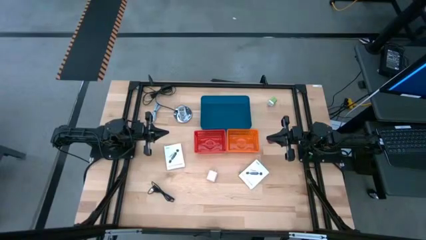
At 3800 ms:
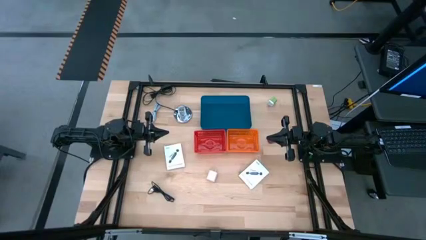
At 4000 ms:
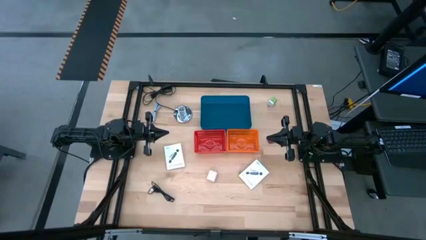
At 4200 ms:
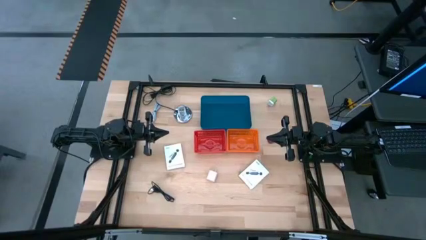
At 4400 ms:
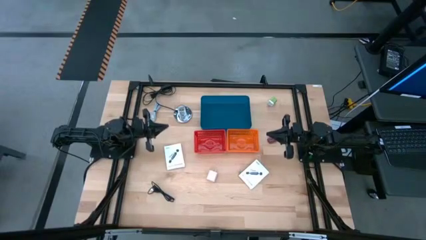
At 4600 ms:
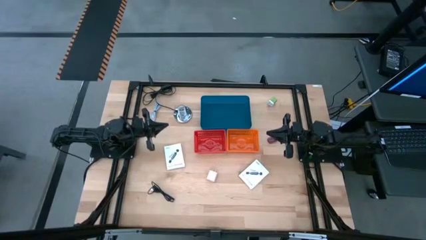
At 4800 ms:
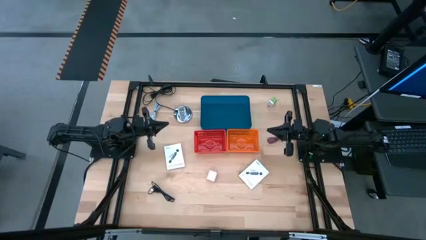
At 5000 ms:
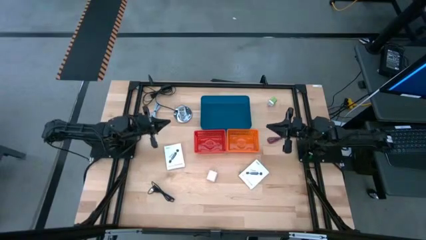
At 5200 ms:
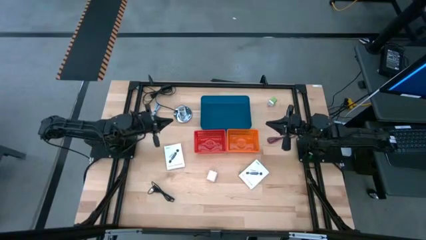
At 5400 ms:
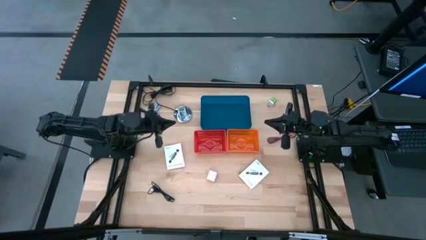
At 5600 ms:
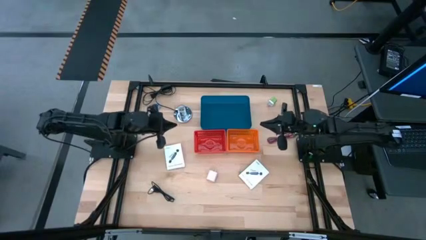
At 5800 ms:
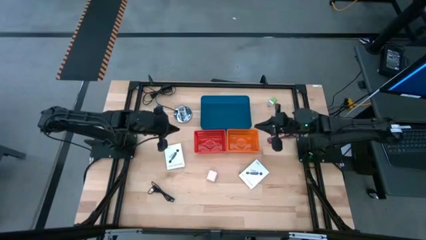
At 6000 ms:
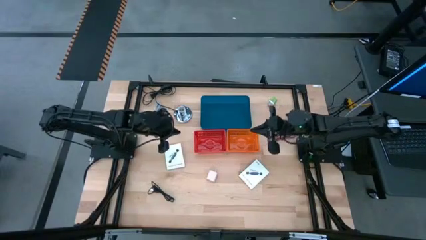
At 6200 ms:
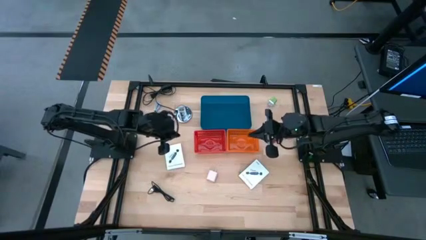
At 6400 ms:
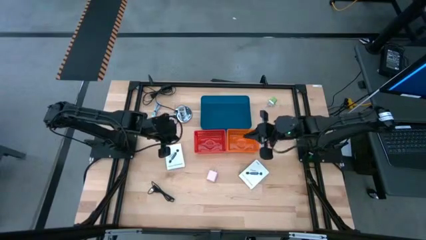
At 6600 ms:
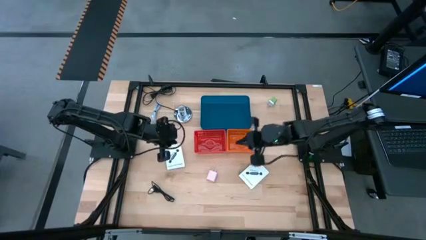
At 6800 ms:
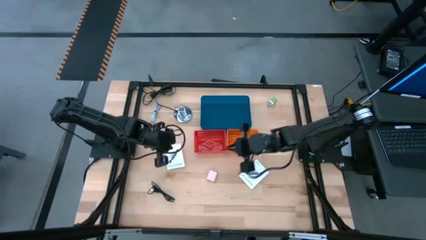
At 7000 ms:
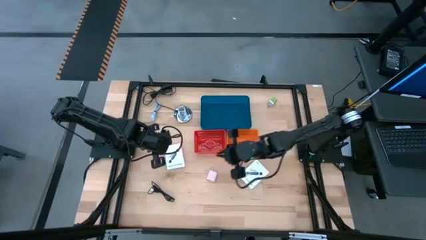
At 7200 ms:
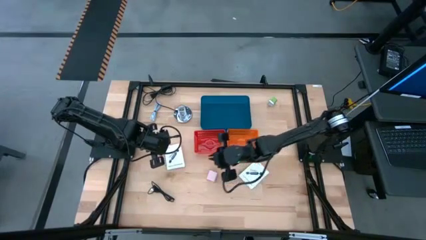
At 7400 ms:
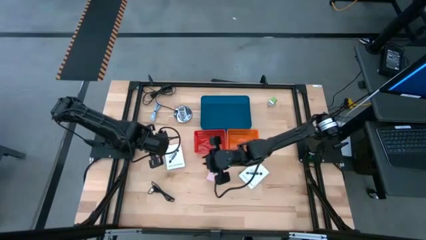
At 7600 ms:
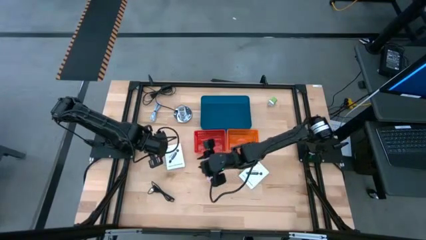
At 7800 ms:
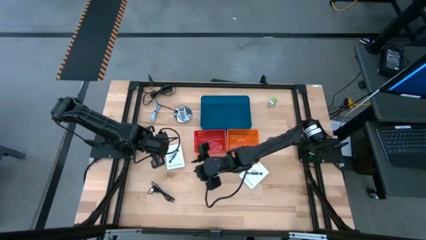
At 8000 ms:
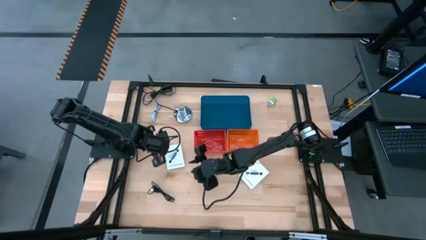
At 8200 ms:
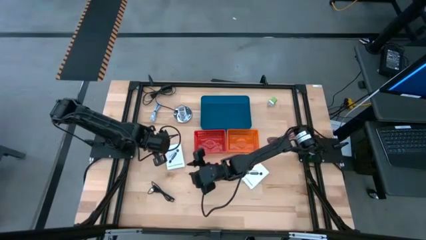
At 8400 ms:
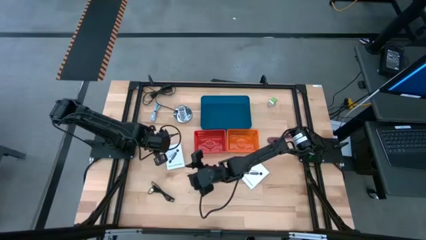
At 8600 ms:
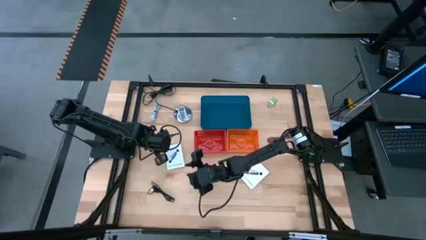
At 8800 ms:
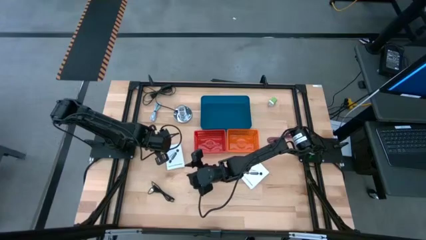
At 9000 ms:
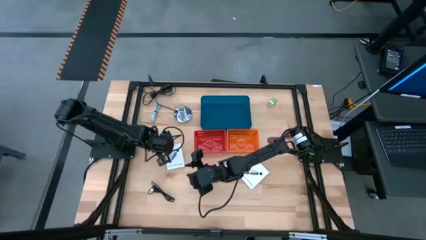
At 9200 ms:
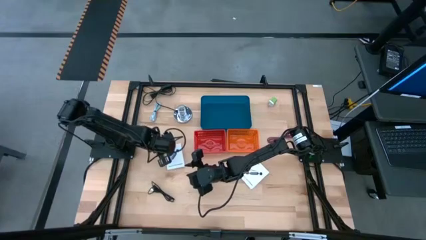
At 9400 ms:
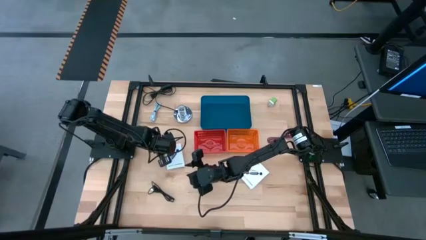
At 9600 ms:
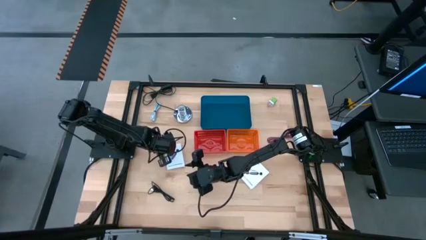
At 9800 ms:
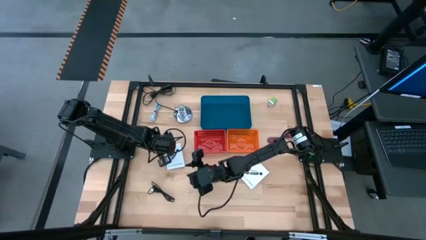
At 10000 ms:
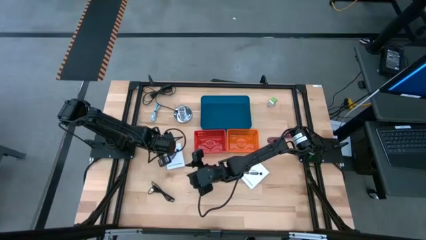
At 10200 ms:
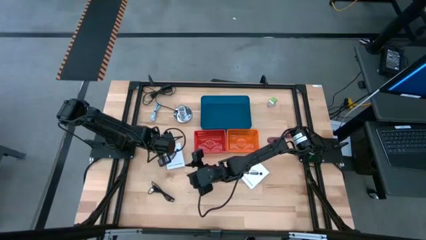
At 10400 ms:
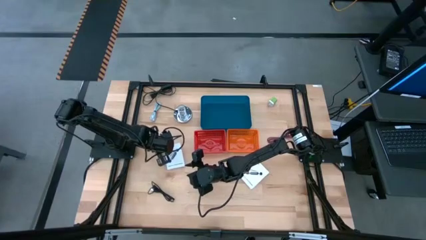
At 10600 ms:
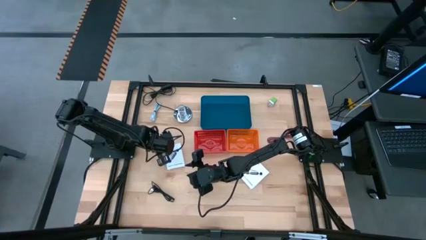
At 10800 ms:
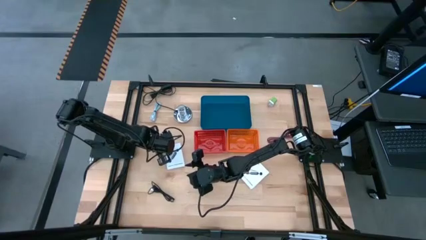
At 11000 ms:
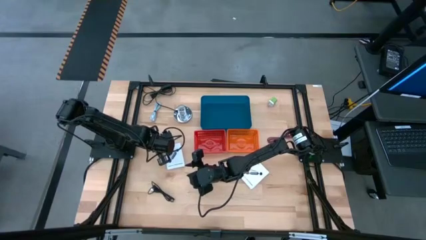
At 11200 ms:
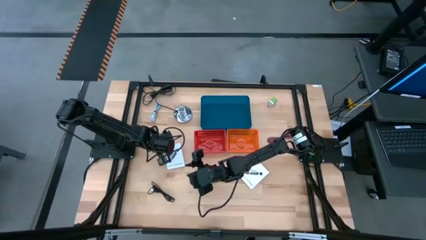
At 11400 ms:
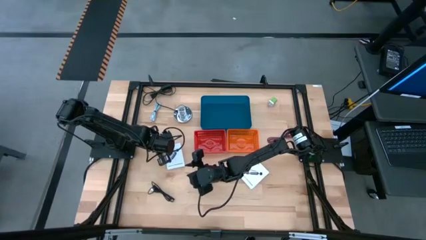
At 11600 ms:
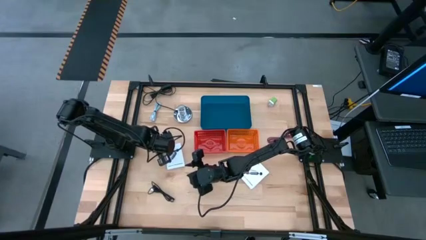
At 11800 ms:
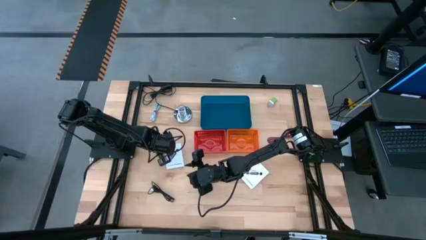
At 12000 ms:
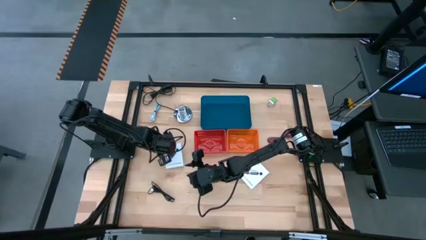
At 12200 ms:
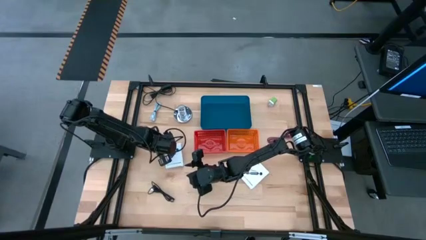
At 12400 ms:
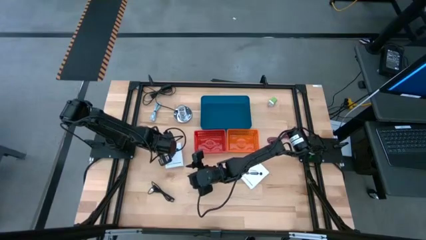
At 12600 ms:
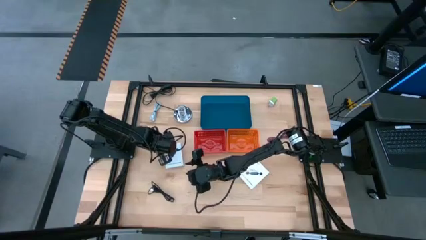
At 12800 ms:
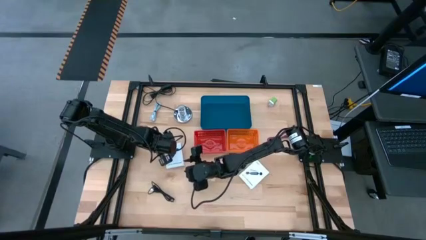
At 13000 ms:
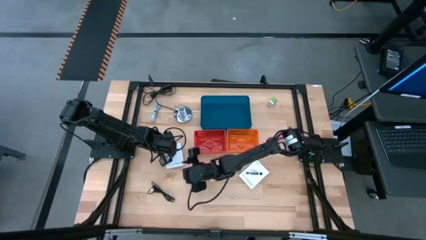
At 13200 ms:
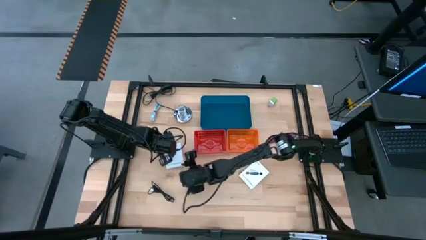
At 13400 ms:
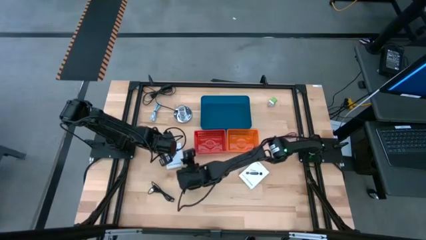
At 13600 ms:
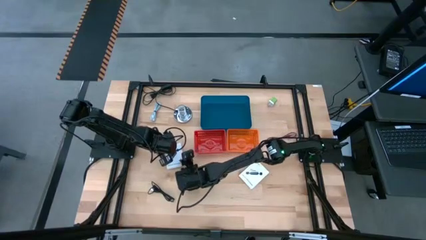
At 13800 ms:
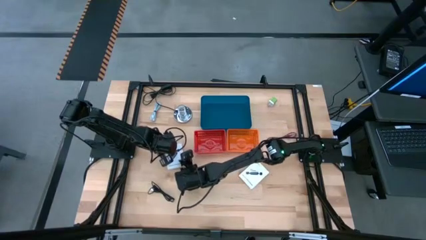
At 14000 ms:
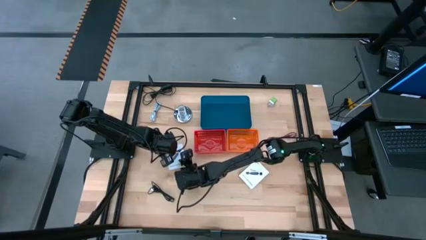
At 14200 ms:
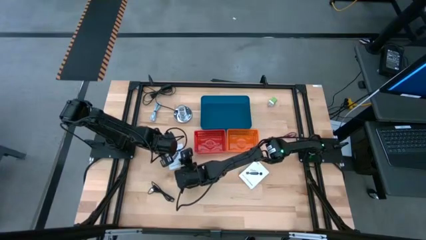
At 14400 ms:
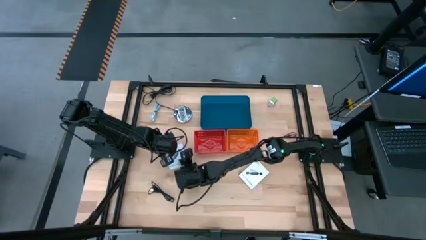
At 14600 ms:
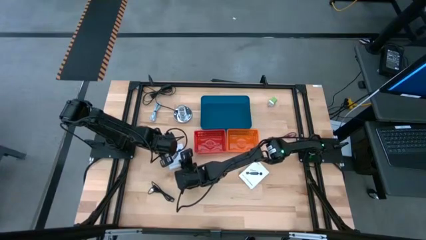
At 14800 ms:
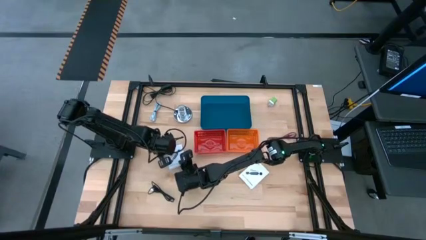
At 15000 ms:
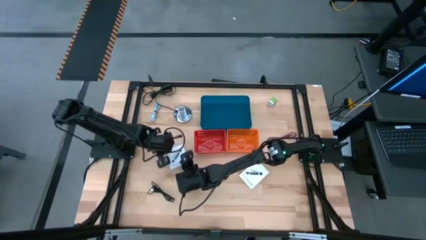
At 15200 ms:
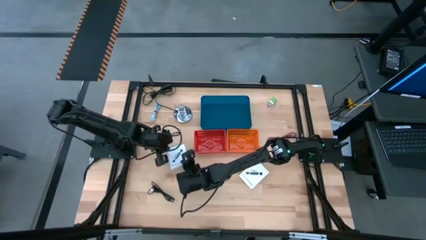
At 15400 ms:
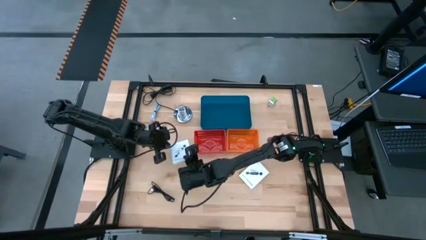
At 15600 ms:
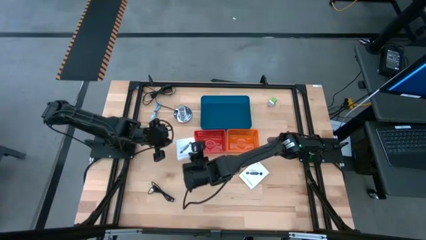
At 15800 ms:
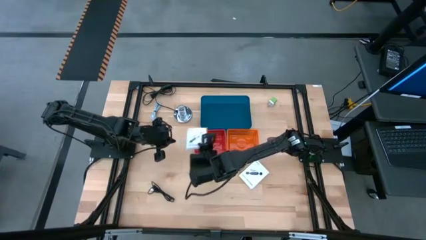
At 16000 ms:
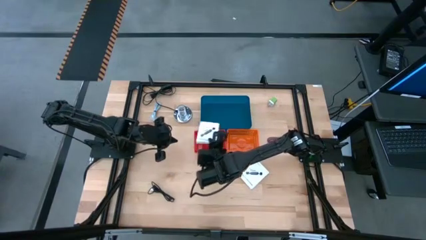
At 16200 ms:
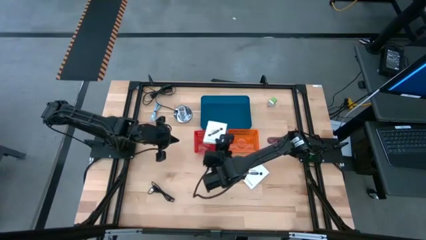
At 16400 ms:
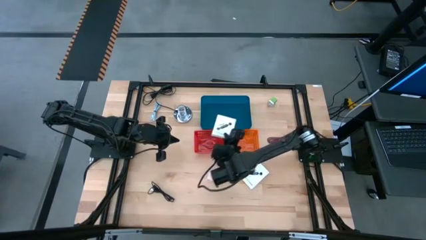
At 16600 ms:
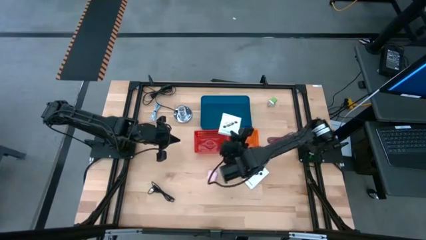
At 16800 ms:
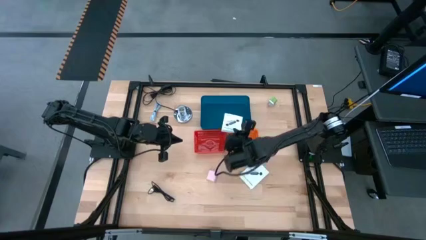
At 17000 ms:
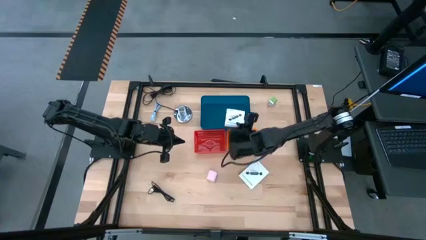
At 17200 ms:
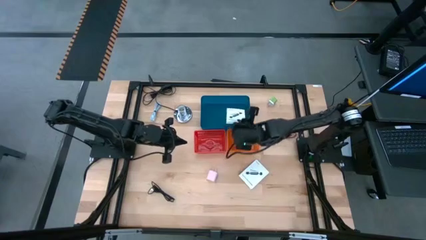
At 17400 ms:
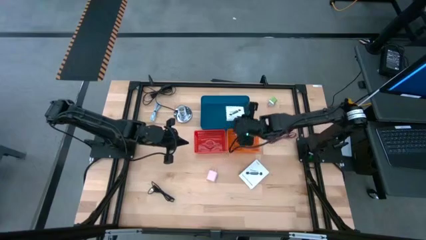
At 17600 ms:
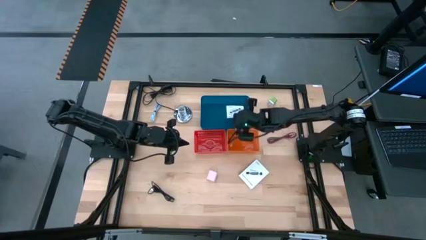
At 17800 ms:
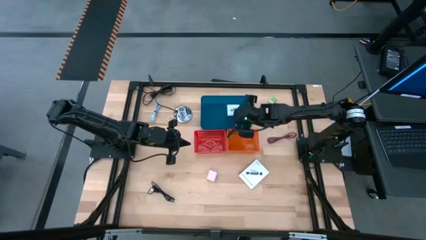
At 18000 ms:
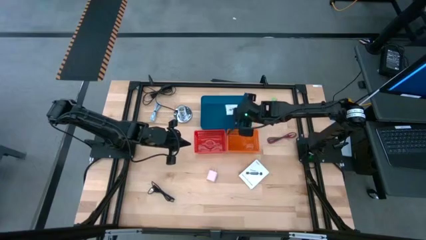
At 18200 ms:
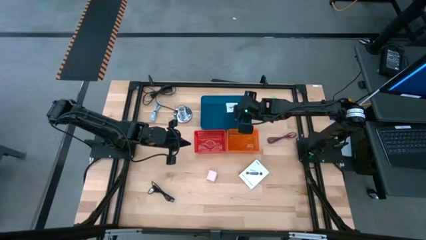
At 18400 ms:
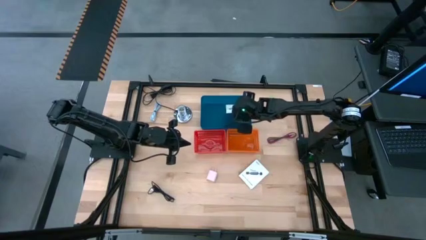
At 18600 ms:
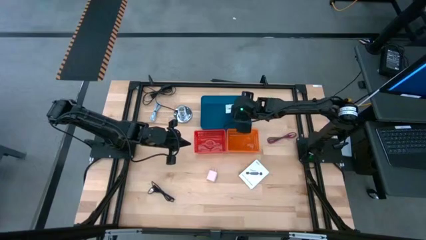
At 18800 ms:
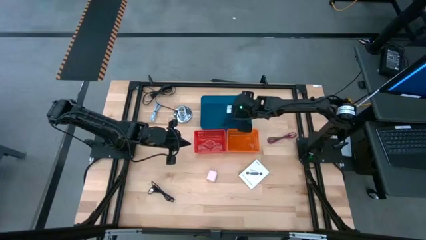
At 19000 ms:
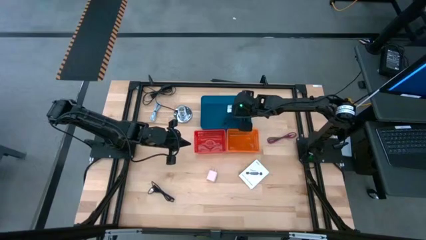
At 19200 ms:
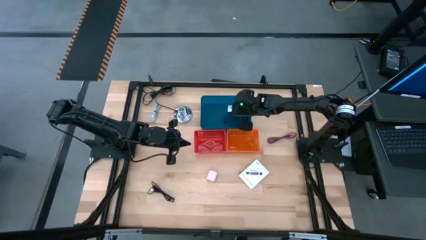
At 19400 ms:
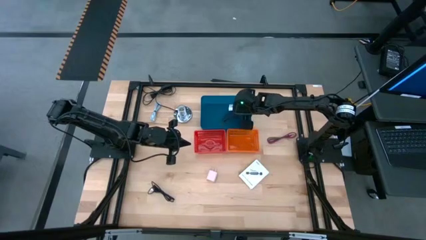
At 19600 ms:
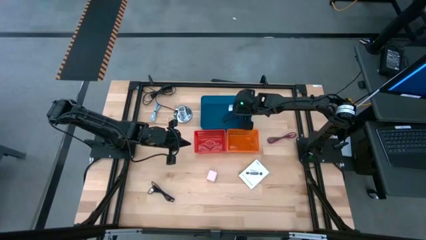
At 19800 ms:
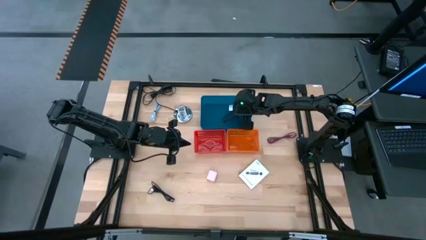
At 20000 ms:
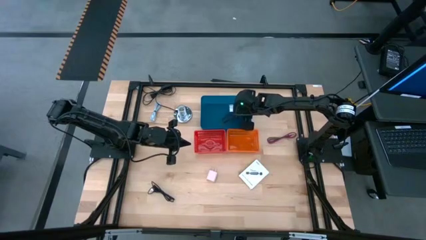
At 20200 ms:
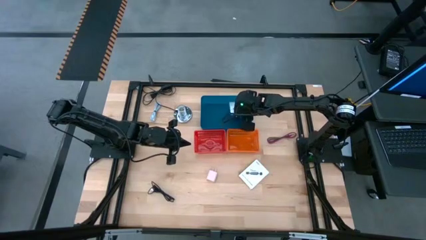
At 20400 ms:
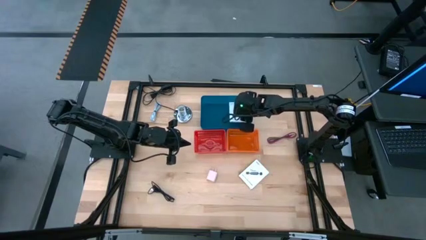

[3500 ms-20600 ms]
Task: Pick and place items into bin
Put the left white card reader box into the blue bin
